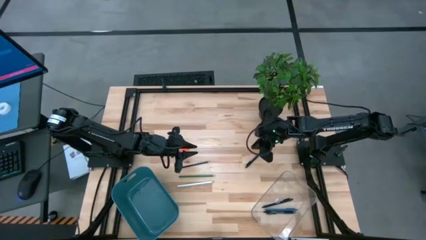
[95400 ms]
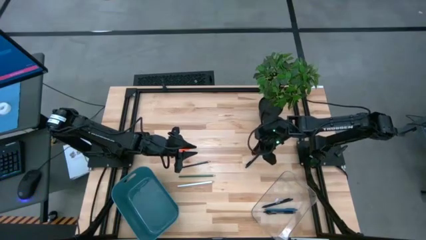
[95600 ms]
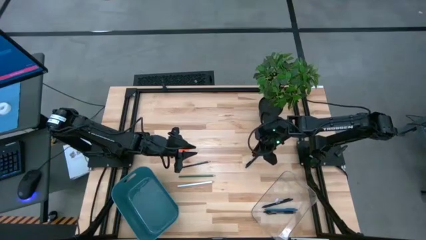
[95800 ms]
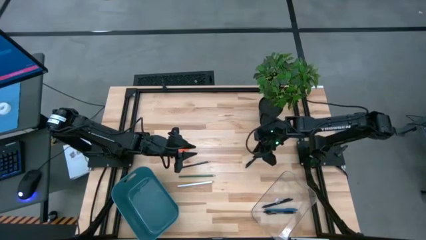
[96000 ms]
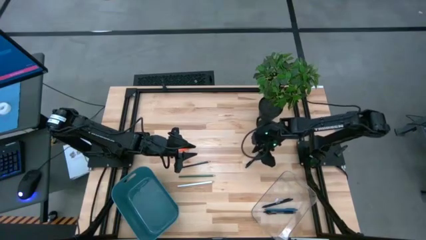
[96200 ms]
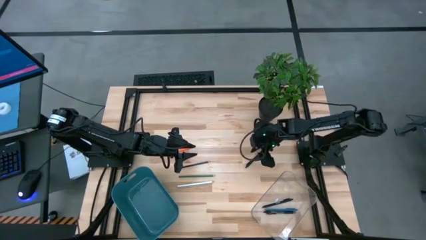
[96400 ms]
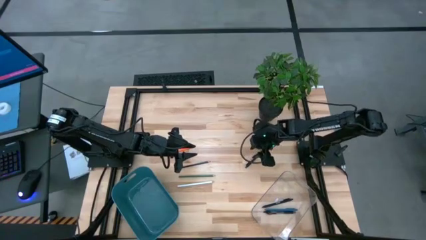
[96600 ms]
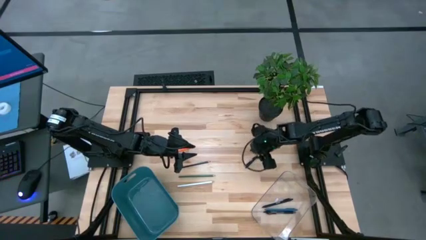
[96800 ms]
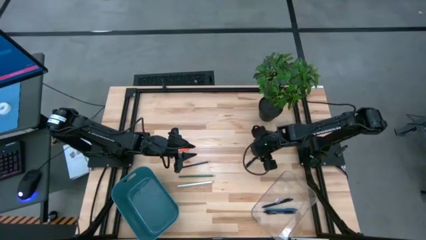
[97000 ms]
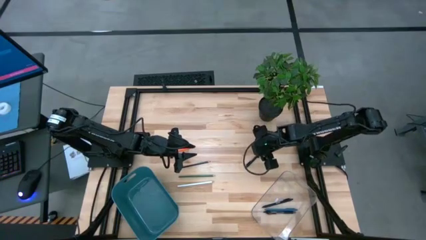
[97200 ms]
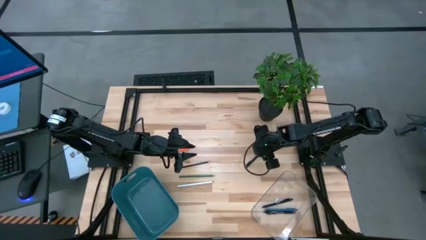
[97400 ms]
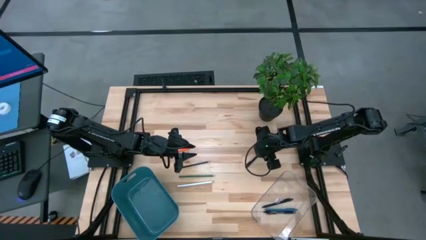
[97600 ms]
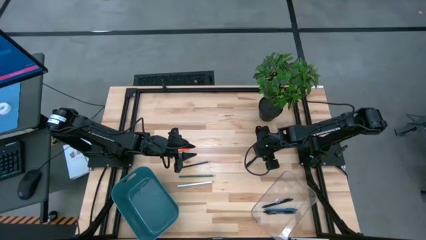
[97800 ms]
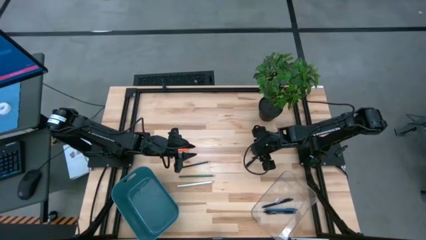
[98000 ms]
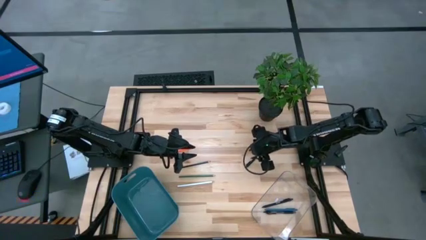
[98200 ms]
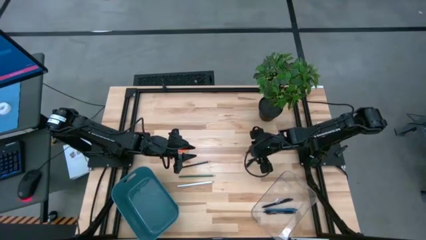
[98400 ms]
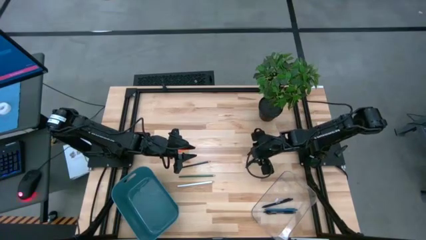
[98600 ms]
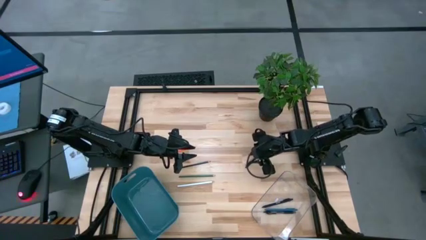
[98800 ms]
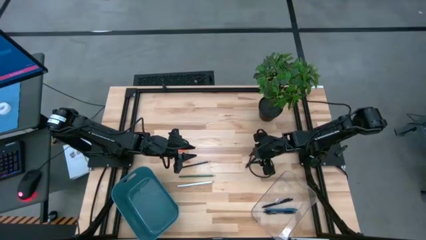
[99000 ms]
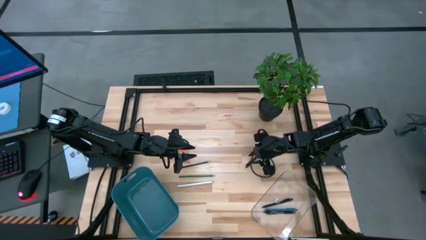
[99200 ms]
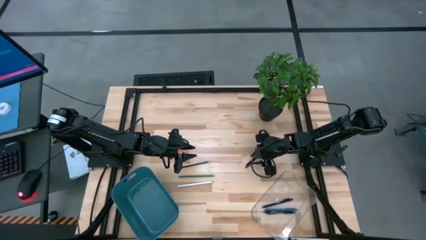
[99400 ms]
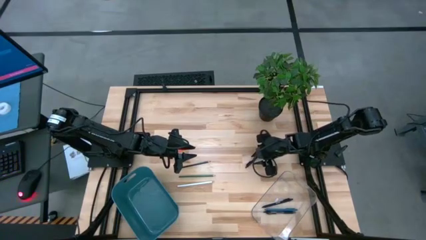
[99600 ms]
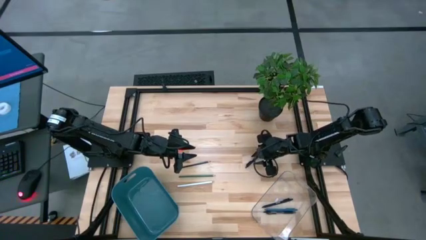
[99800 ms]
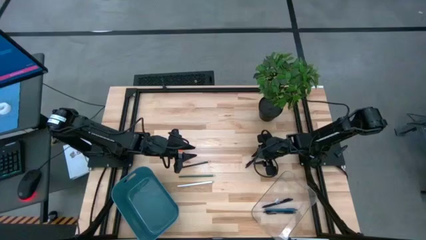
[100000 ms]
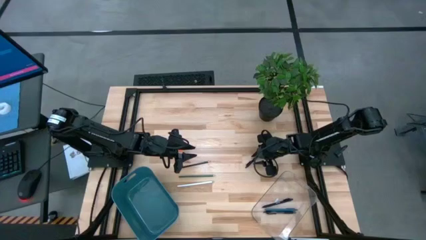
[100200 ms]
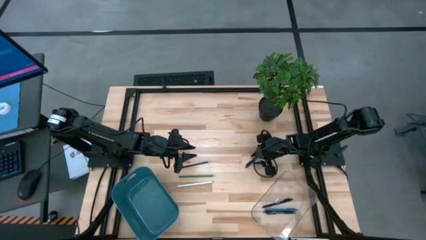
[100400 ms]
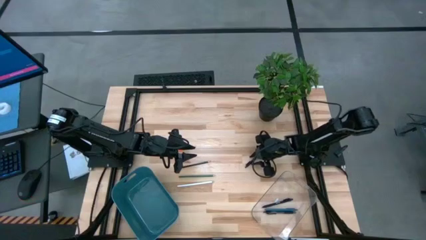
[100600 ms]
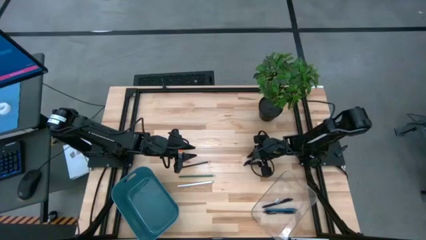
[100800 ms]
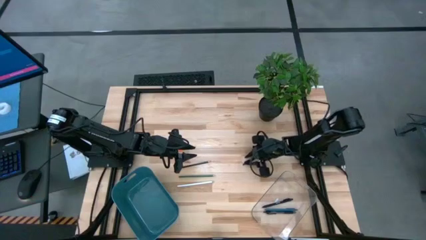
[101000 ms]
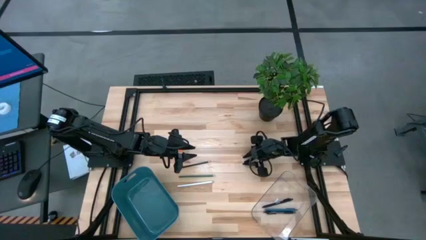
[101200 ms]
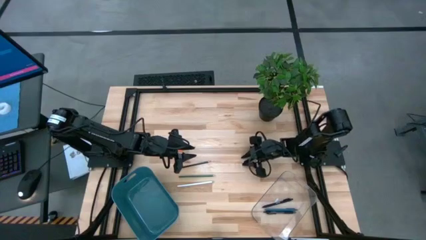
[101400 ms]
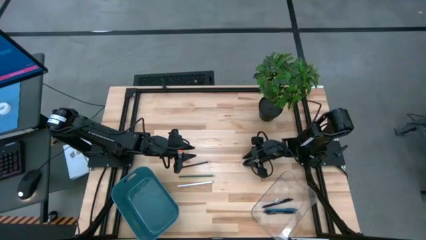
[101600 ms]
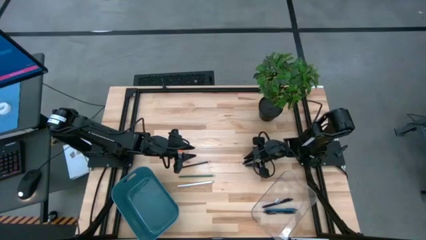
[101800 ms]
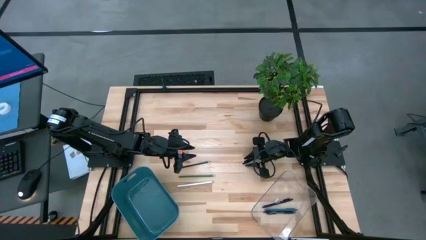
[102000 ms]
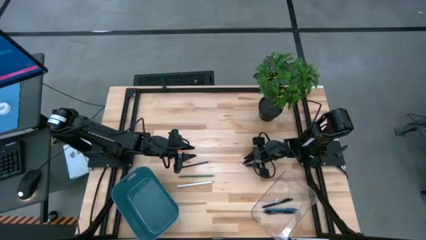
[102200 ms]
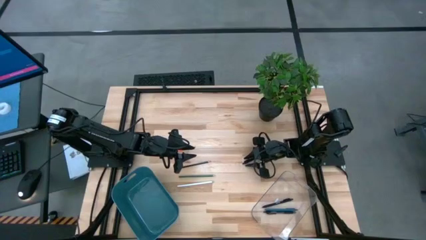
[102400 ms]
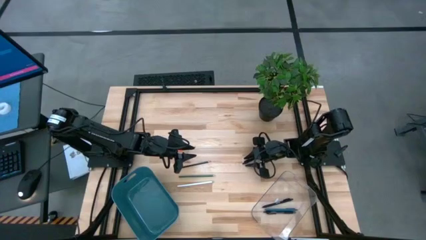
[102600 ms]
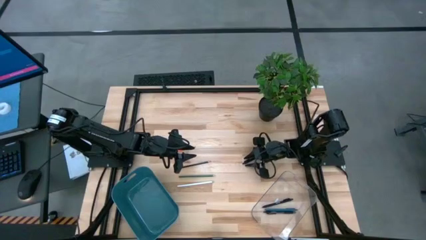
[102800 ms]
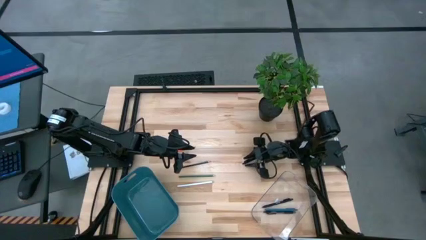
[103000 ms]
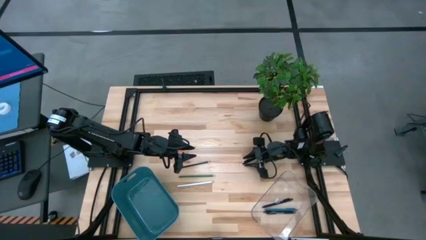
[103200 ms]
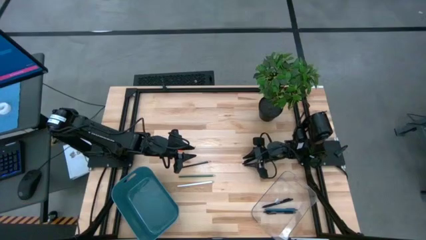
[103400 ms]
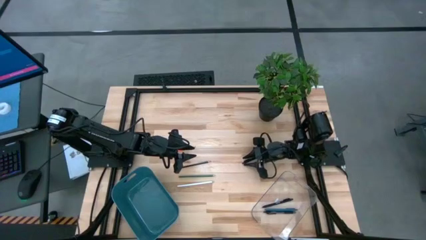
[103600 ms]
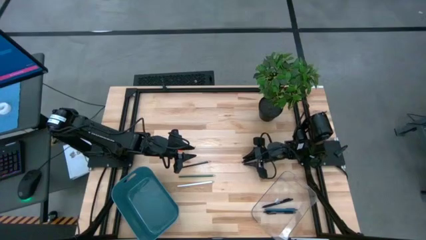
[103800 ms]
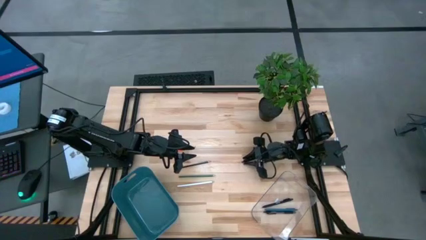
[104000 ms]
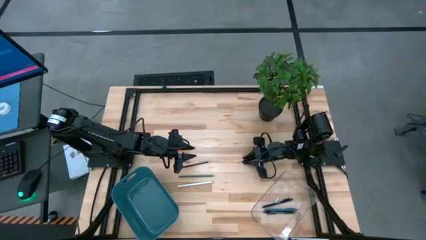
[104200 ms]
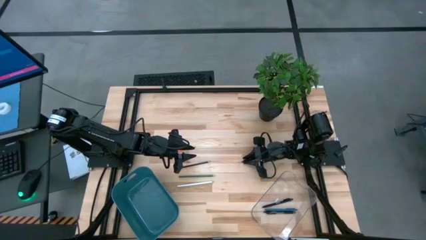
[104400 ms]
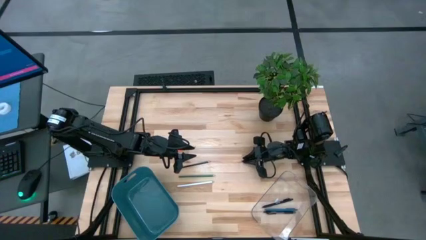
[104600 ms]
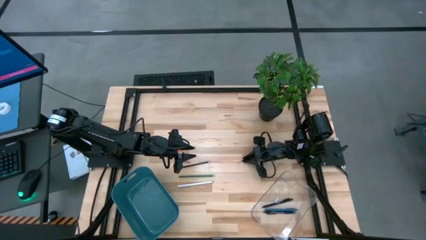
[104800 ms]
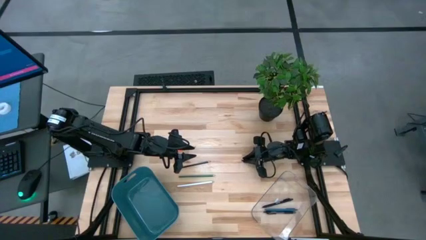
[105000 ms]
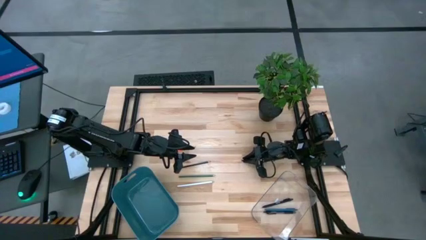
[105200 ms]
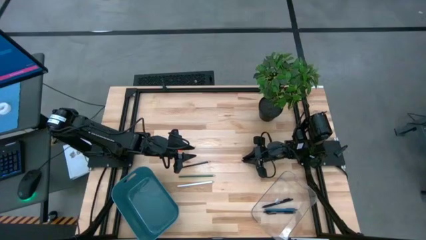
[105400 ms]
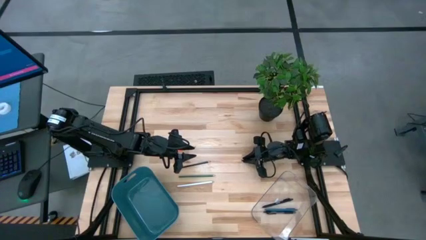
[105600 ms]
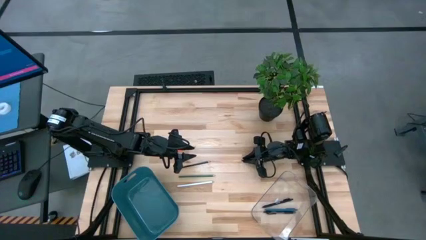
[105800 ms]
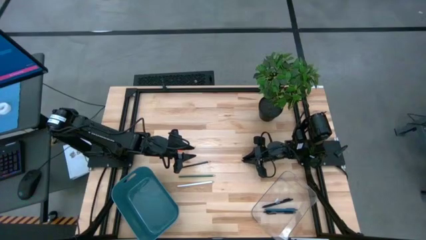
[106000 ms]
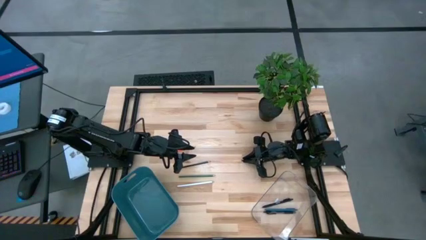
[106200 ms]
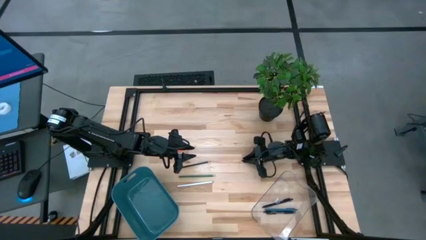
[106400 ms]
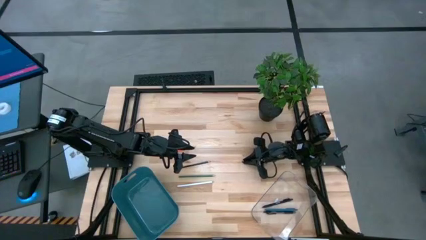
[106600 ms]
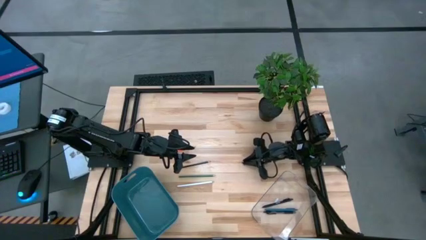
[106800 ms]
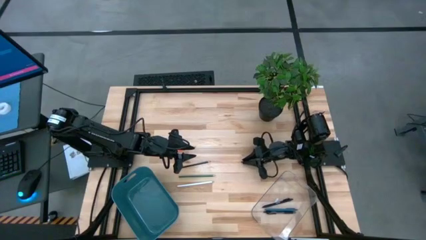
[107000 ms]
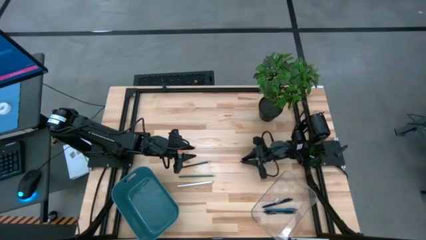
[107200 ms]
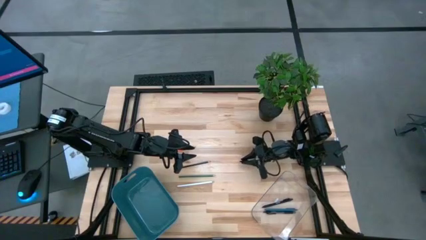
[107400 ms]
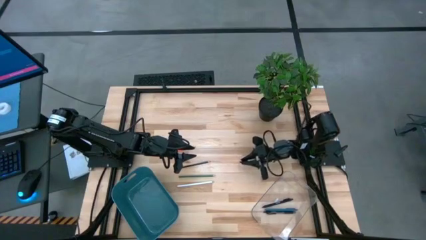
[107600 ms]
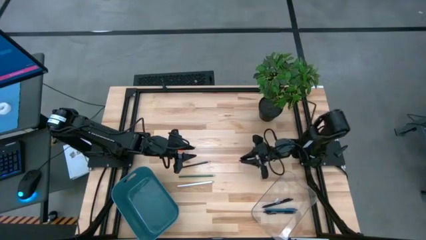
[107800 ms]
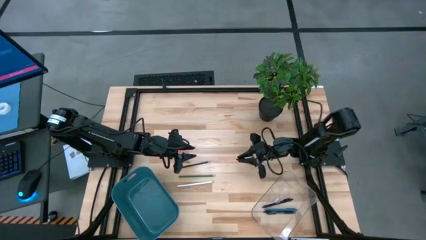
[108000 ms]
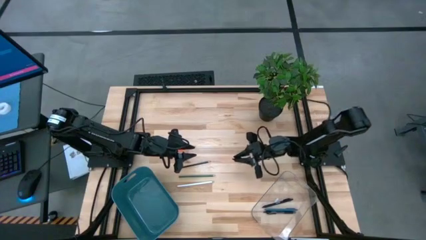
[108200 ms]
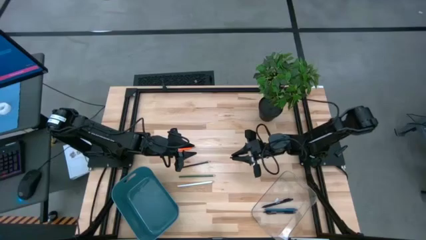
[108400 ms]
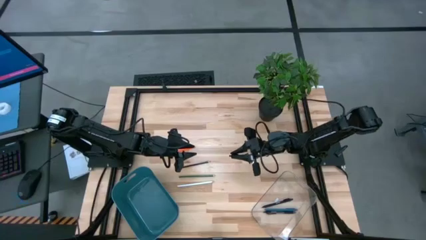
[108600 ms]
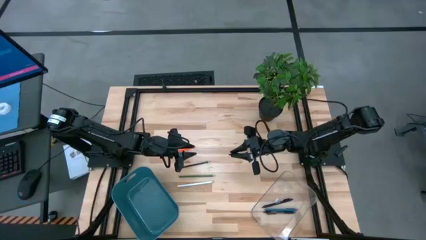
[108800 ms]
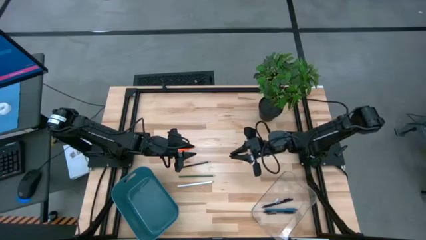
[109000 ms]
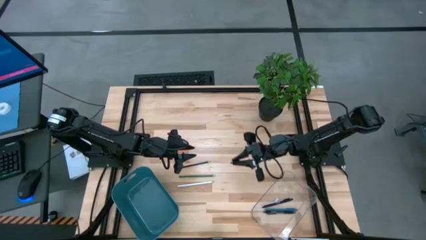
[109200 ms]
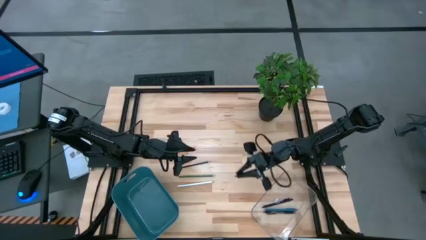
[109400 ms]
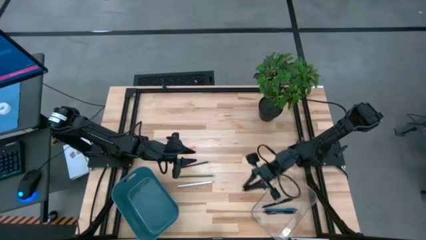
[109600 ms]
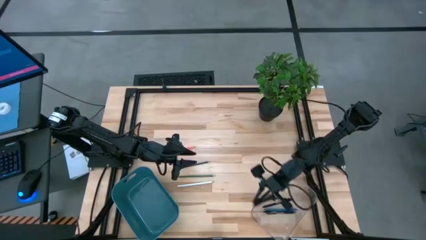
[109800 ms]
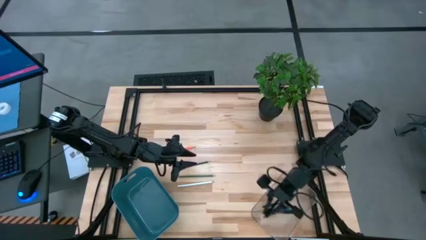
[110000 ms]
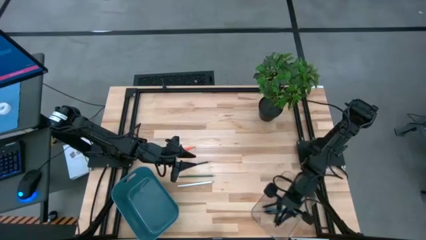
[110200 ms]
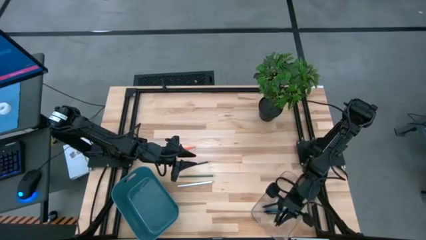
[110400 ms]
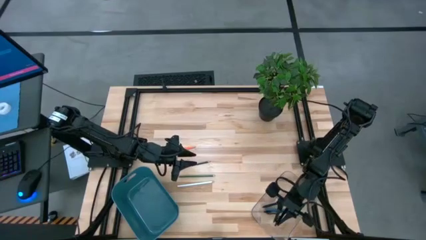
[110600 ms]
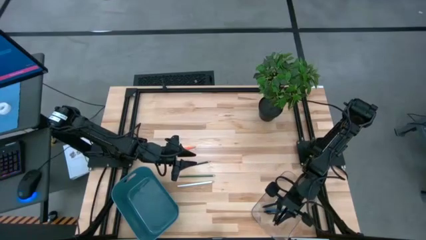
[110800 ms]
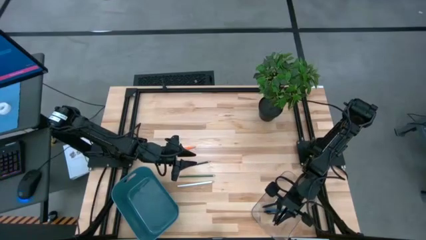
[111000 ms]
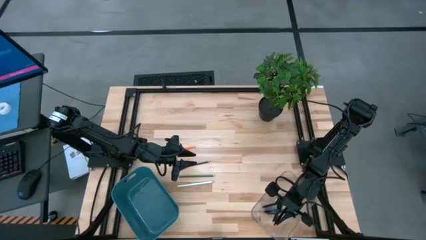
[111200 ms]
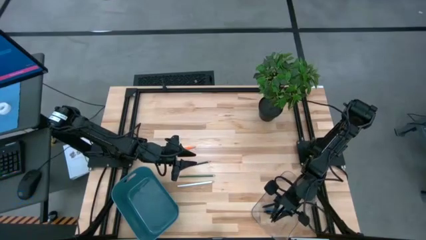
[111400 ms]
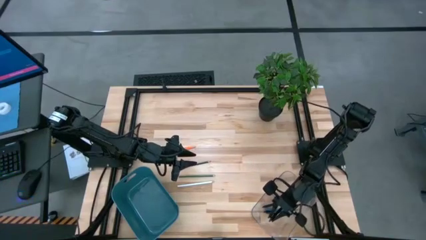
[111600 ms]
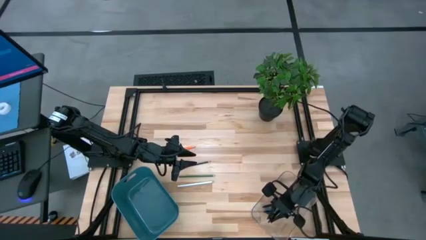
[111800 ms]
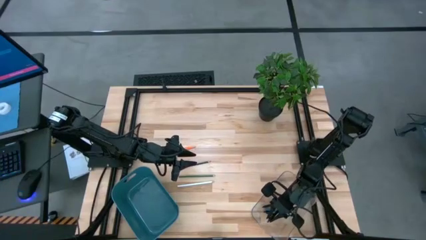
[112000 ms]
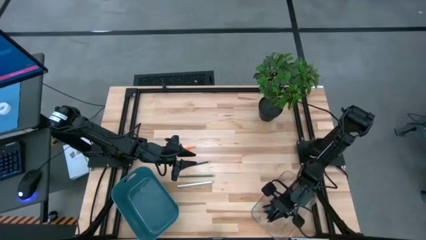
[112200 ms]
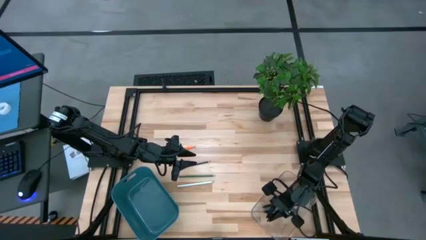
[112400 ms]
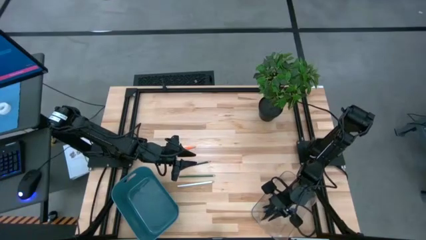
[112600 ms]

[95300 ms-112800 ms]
Task: Sort pens & pencils
Put the black pen in the transparent bin
